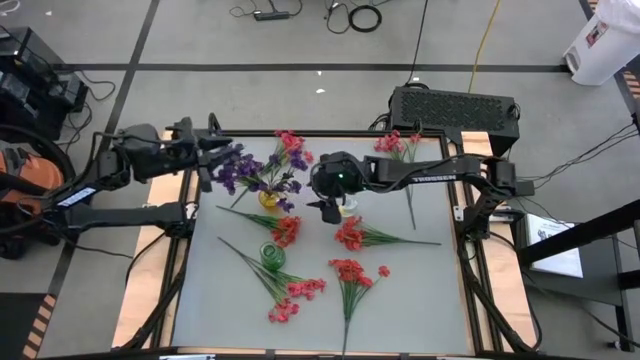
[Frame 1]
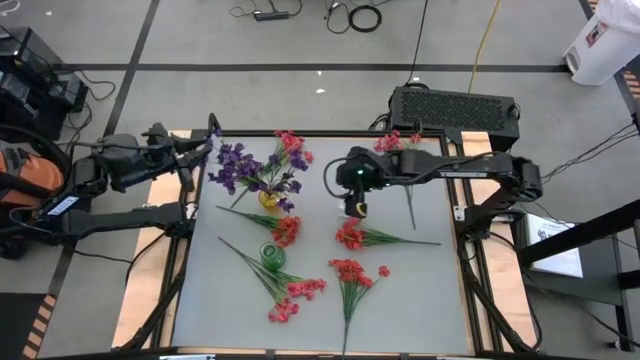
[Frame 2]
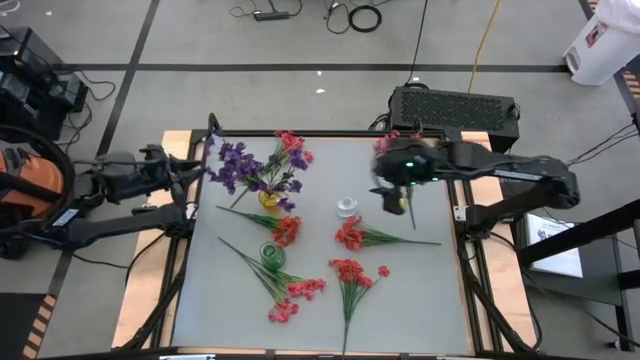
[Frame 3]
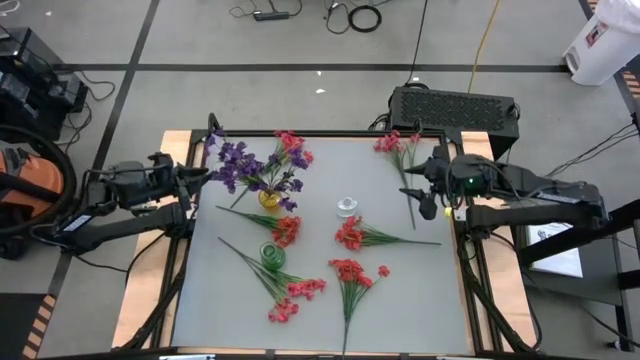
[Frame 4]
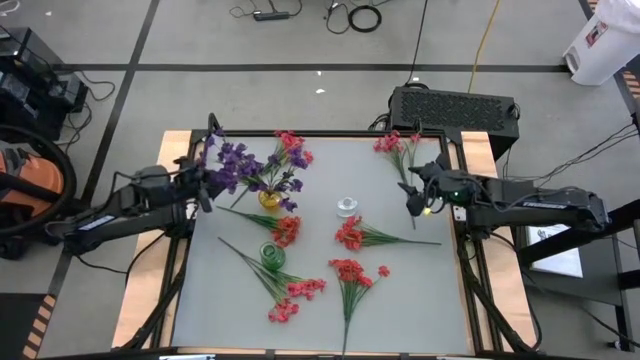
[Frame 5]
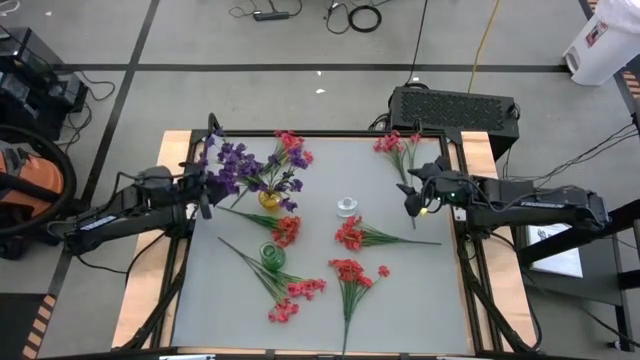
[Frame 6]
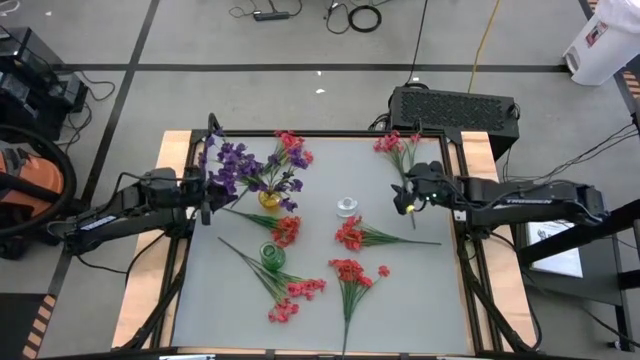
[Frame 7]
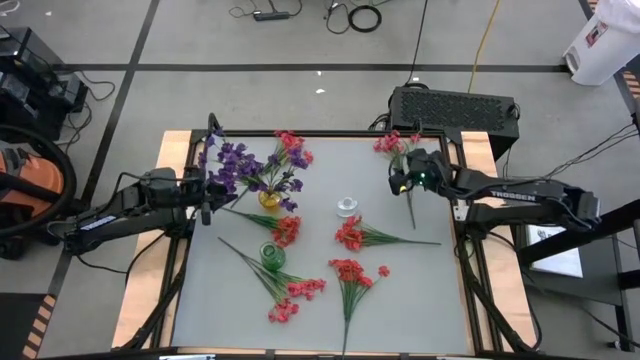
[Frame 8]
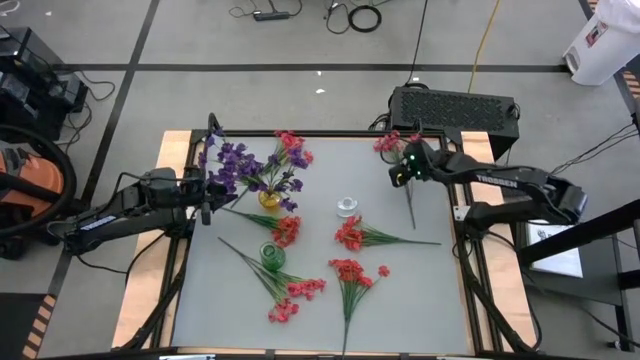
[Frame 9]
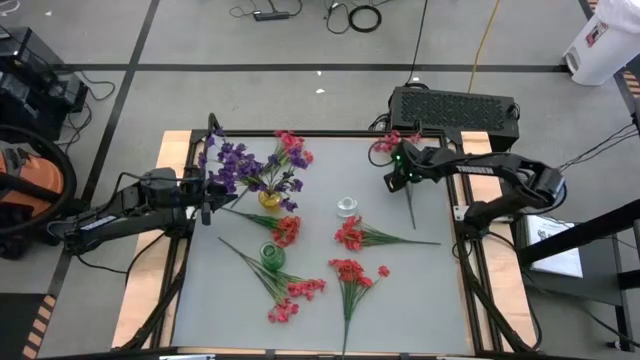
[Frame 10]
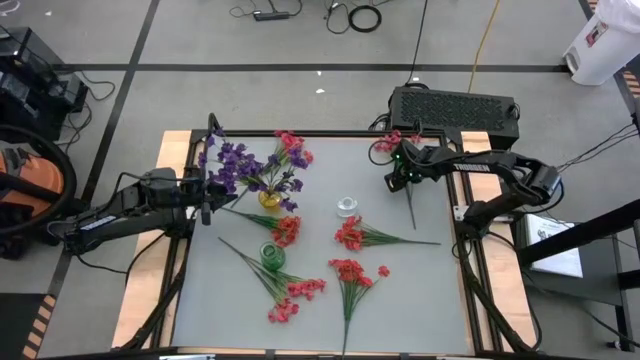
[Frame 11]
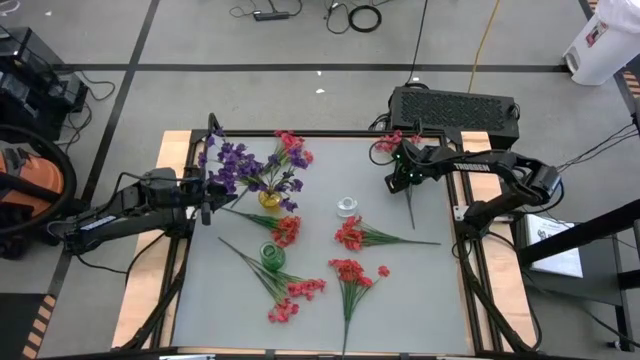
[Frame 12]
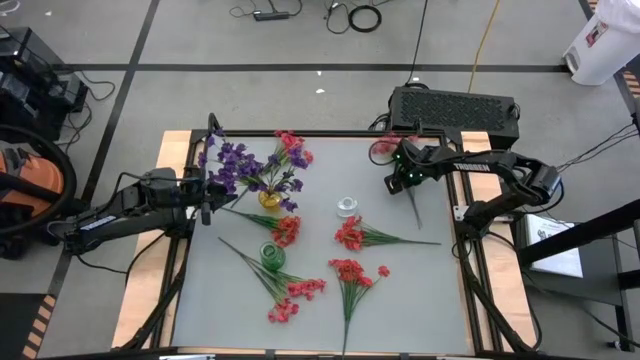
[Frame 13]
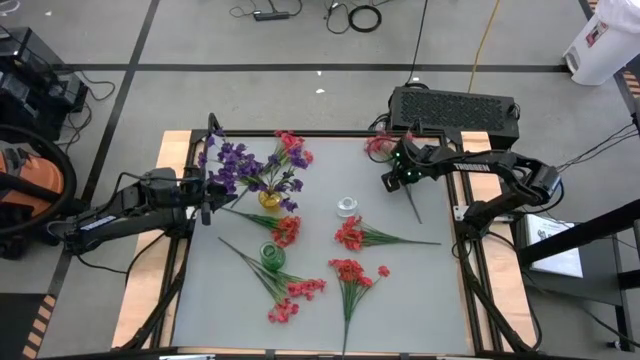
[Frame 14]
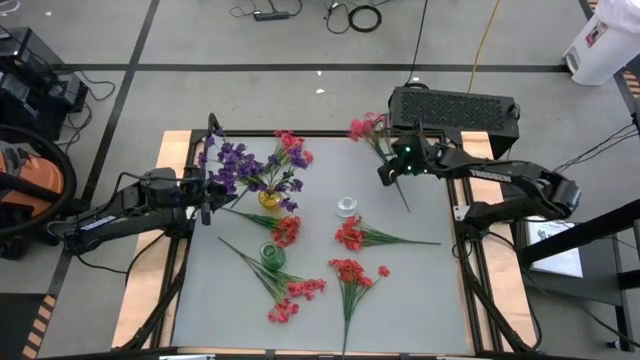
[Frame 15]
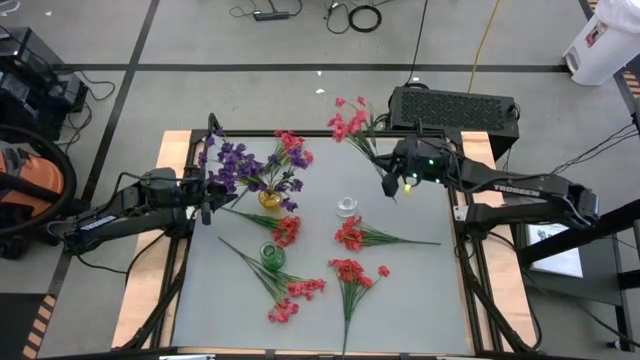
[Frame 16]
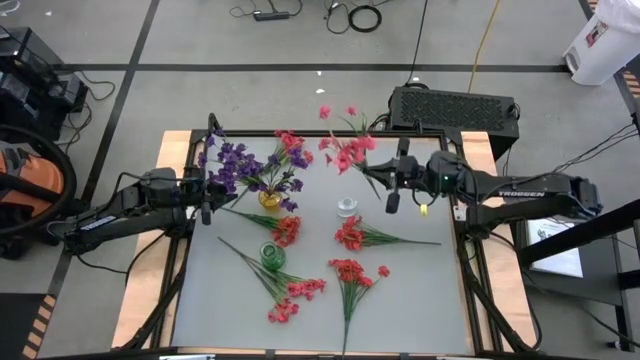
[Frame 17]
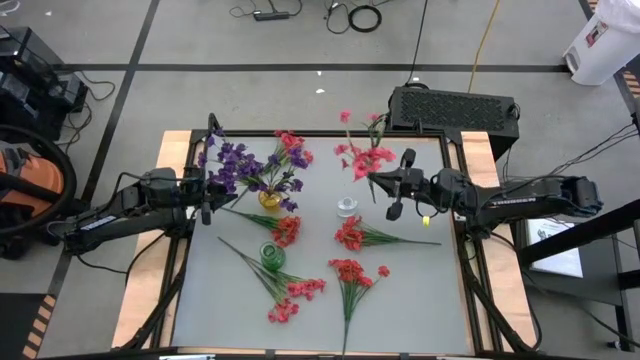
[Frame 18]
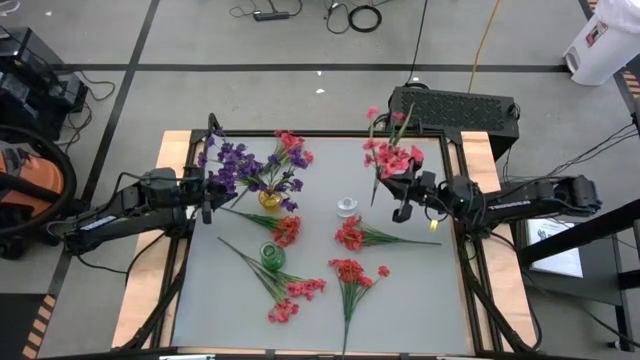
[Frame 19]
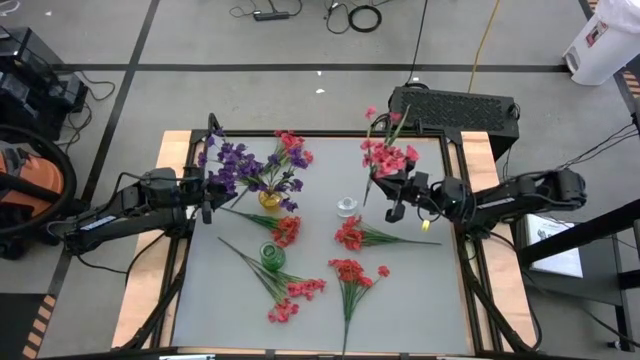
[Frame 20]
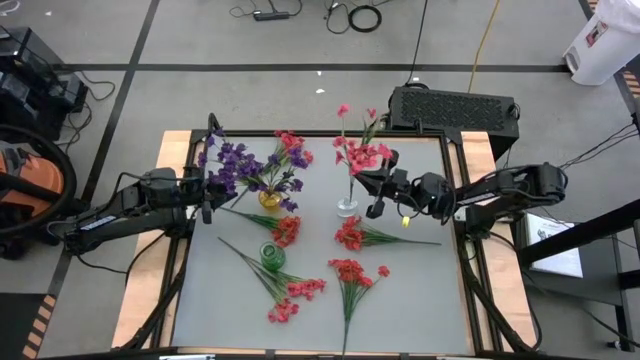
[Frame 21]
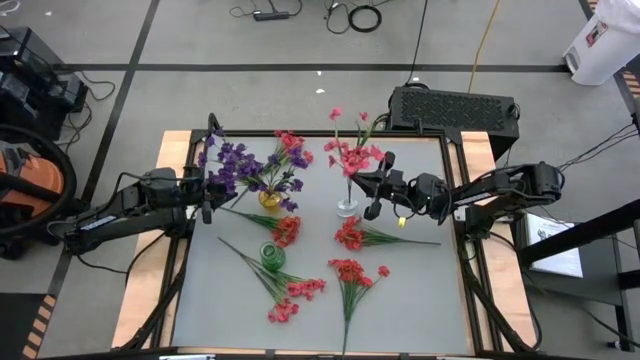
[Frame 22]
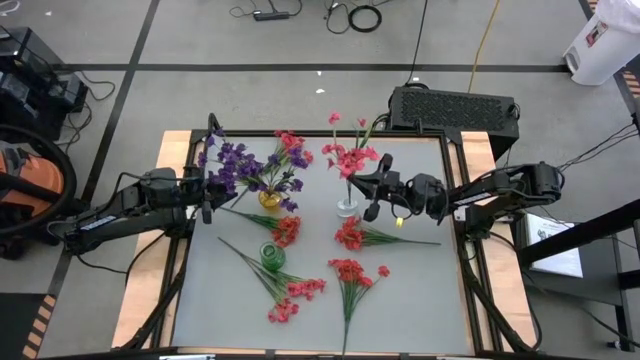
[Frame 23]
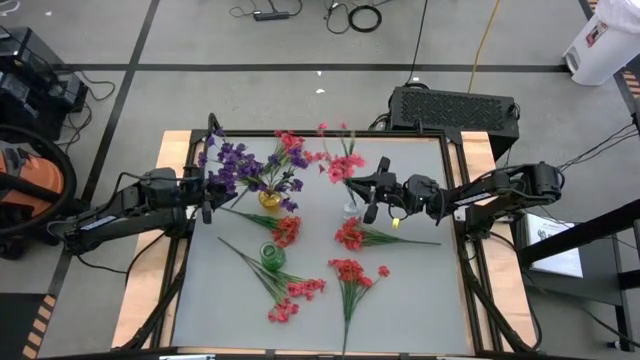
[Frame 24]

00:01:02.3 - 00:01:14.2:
Task: Sort flowers into vase by color
Put the right pink flowers into the transparent vase

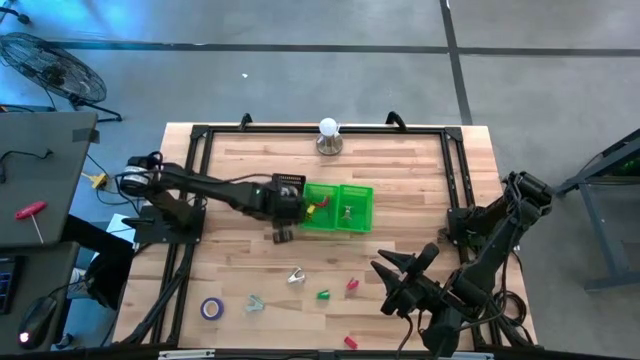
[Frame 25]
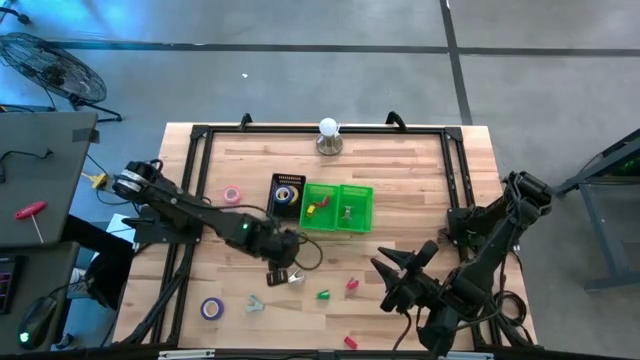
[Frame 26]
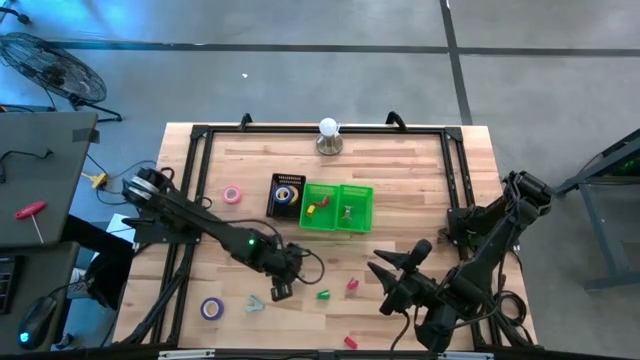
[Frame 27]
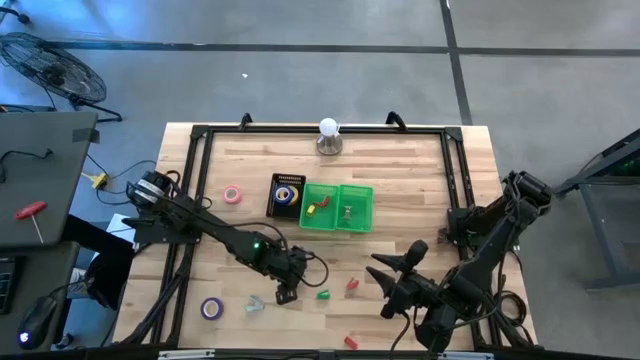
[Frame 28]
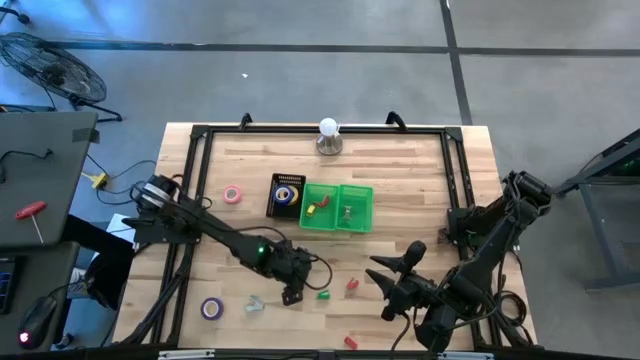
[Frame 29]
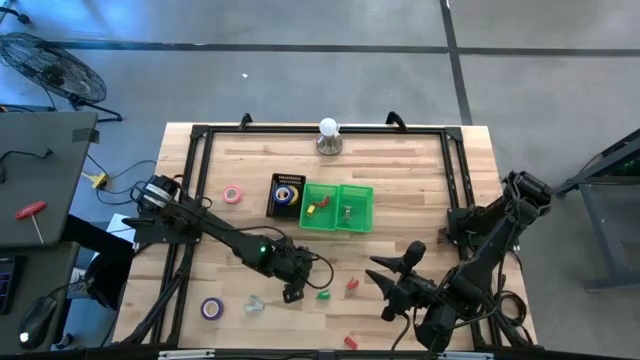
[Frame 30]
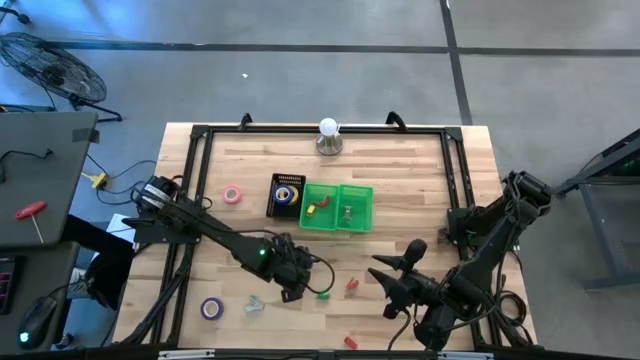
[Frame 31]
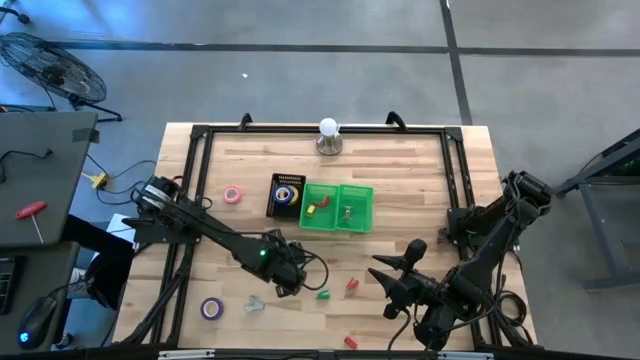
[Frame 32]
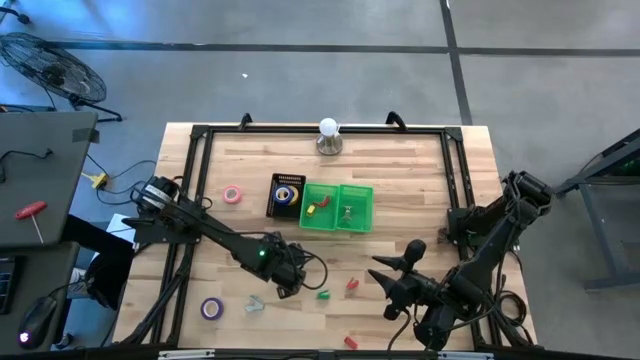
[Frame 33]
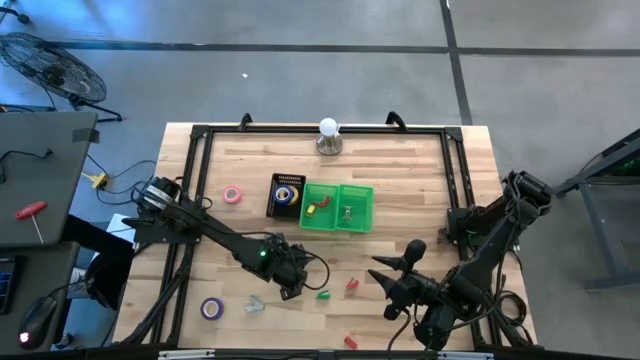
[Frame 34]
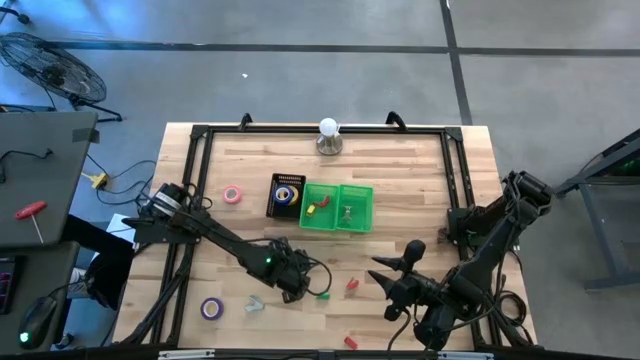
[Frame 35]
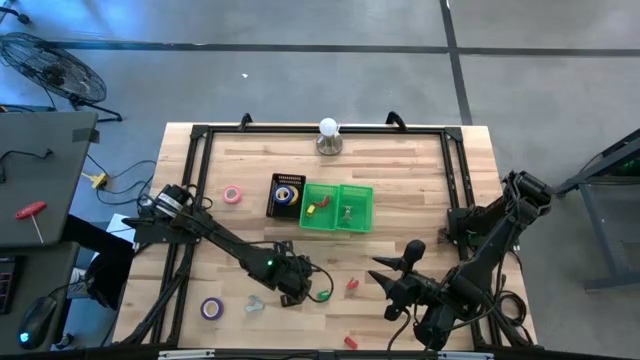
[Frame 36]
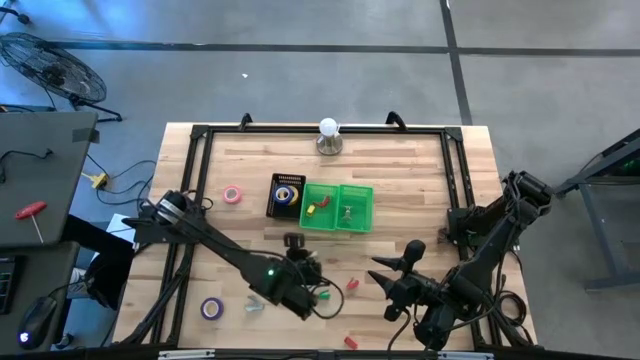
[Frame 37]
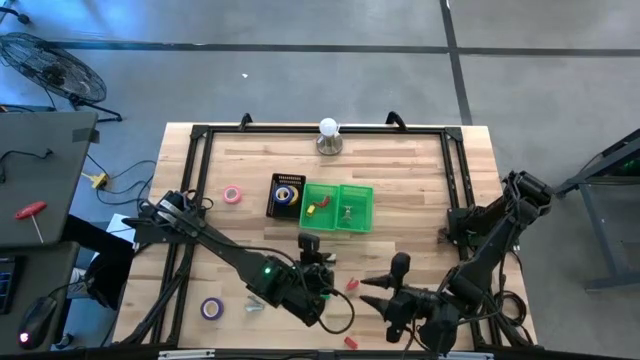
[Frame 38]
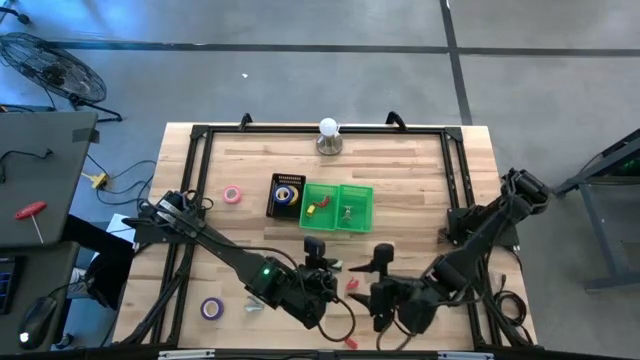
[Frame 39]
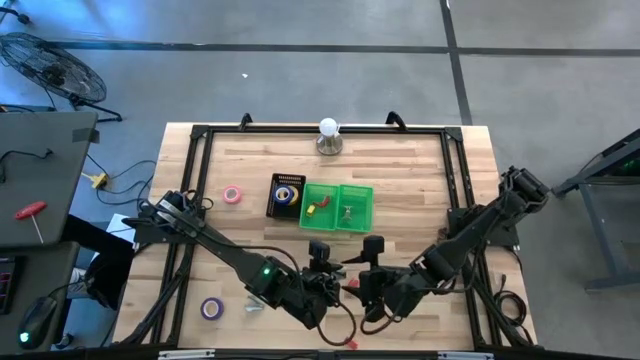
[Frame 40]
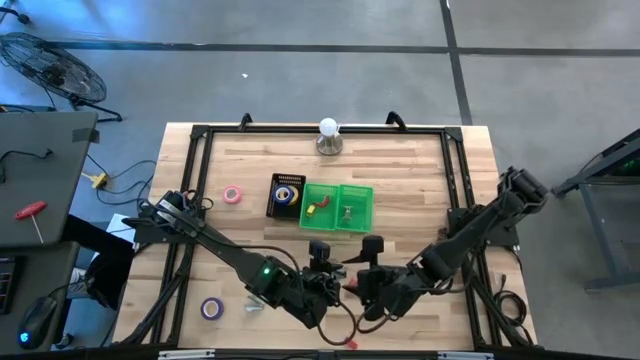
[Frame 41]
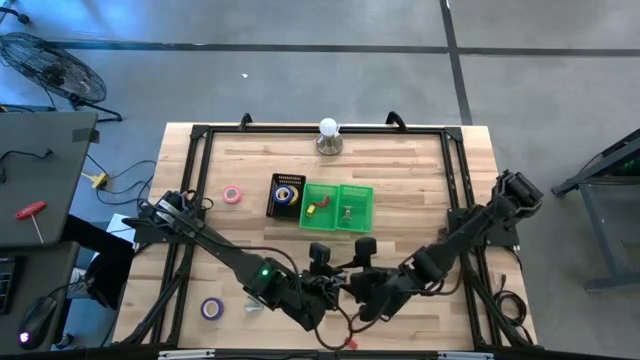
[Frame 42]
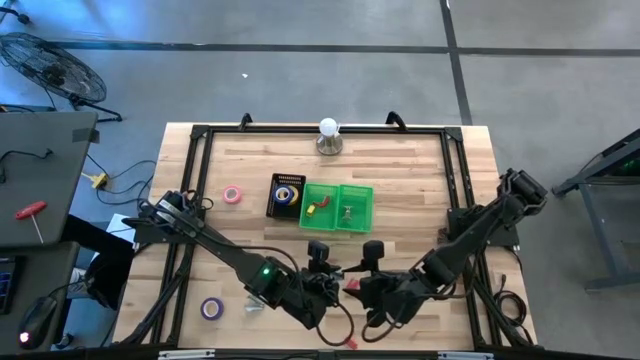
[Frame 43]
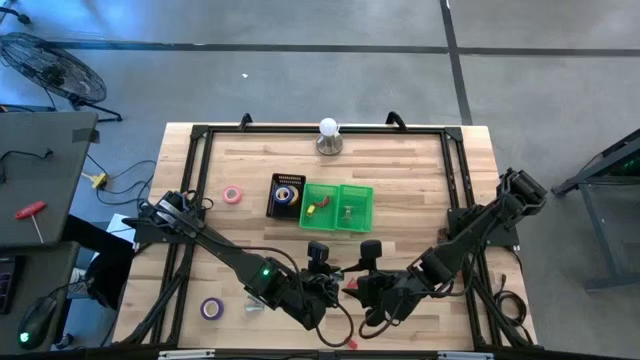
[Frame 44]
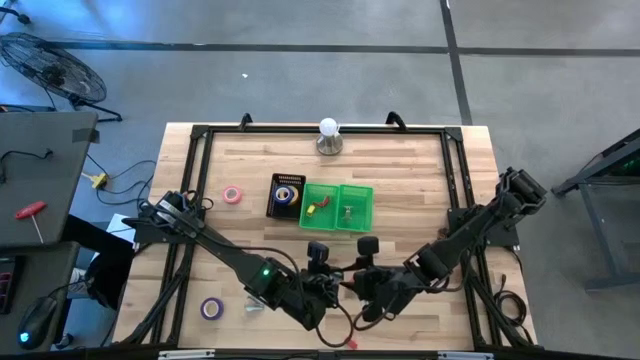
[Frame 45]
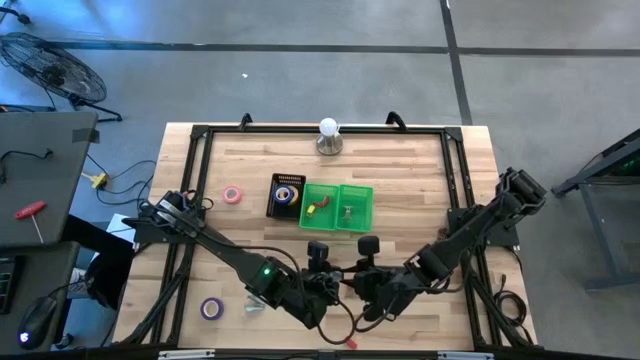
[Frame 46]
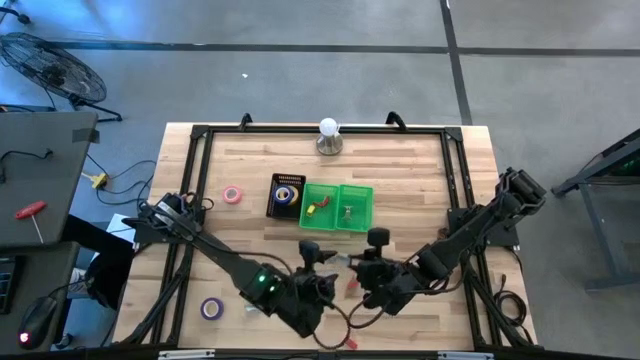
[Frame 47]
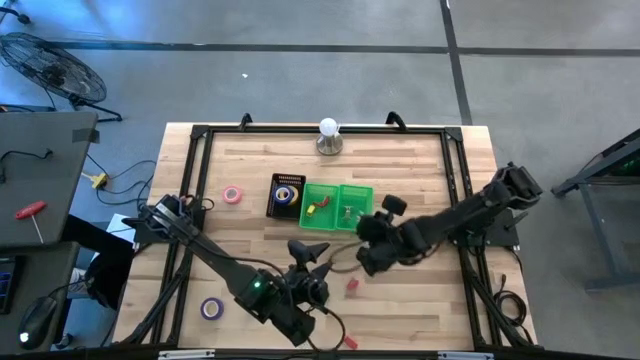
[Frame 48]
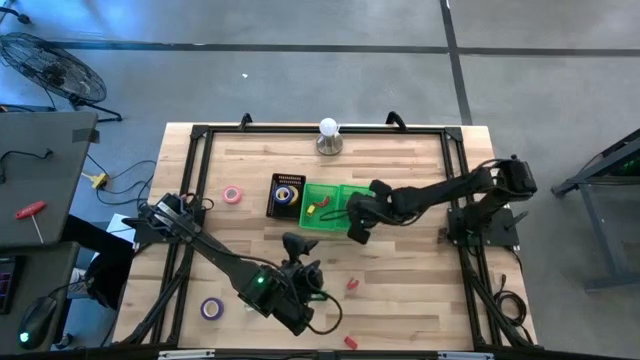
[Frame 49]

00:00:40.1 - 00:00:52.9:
Task: Pick and place Stapler, Stapler remover, tape
Put the gray staple remover into the right green bin
